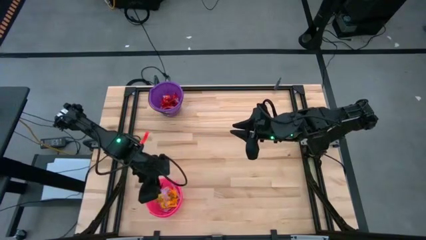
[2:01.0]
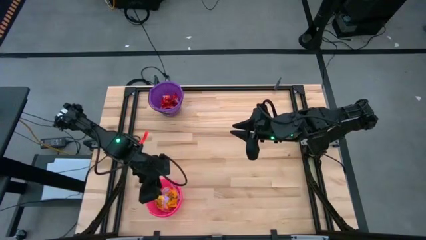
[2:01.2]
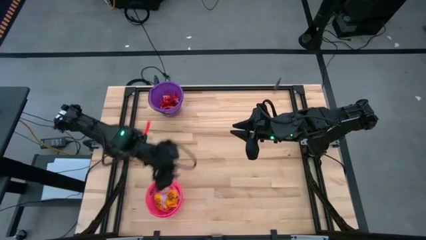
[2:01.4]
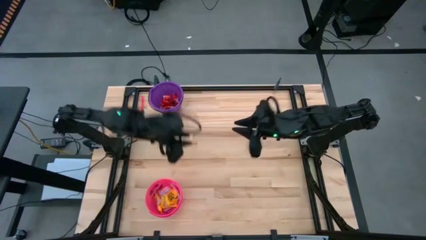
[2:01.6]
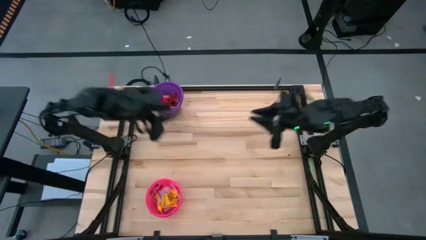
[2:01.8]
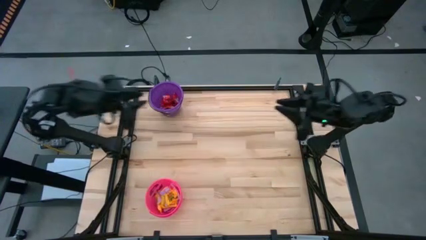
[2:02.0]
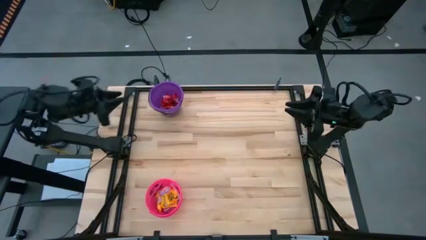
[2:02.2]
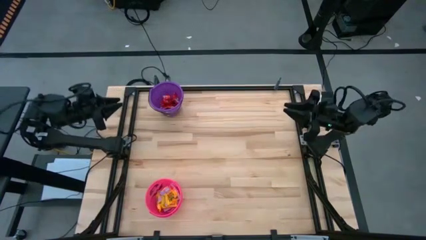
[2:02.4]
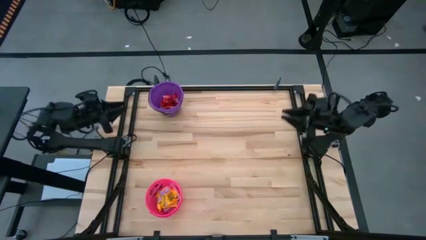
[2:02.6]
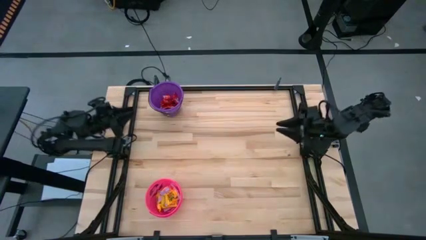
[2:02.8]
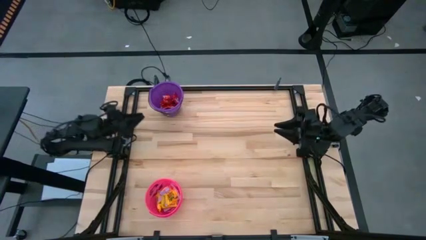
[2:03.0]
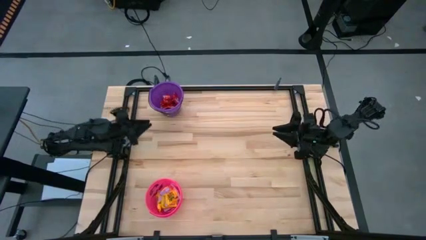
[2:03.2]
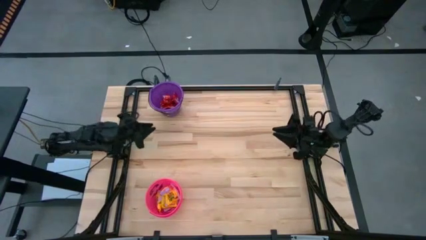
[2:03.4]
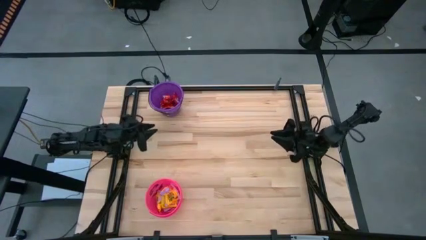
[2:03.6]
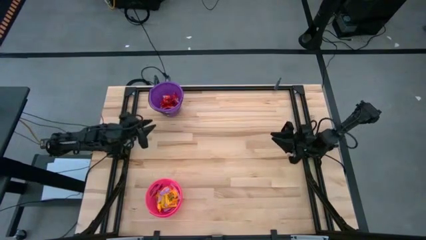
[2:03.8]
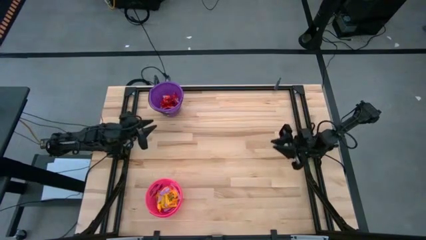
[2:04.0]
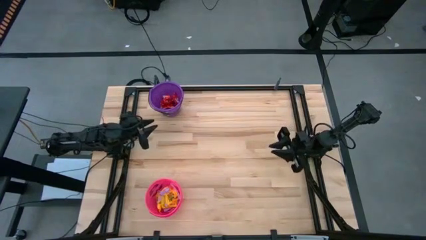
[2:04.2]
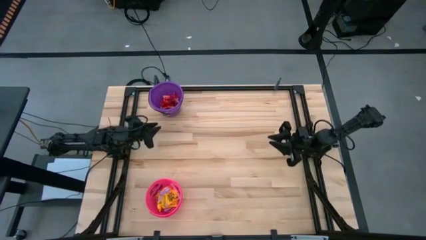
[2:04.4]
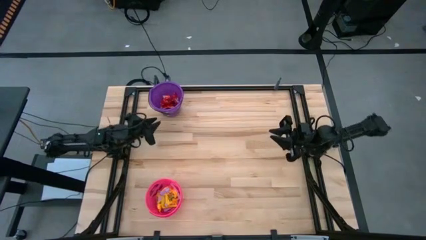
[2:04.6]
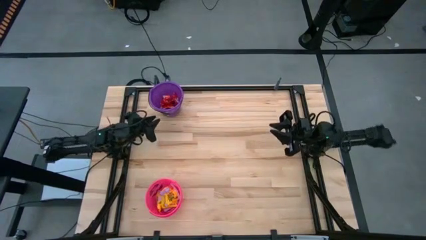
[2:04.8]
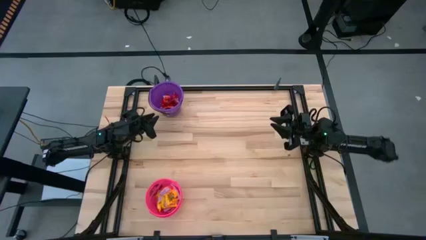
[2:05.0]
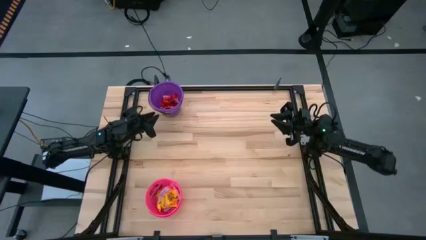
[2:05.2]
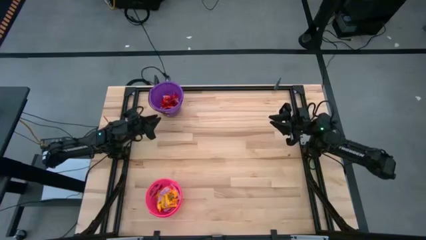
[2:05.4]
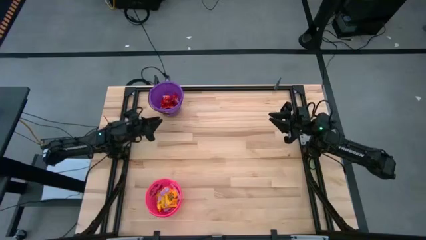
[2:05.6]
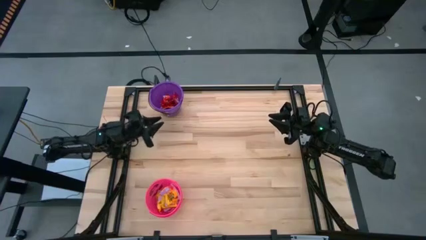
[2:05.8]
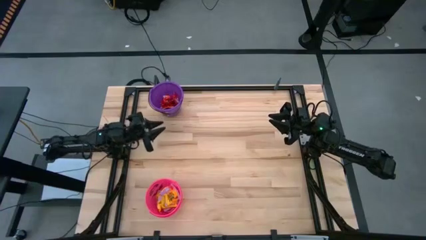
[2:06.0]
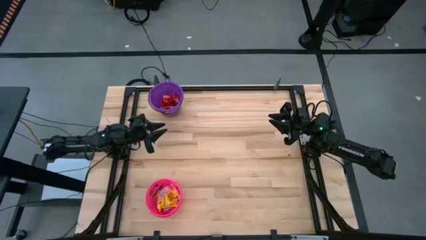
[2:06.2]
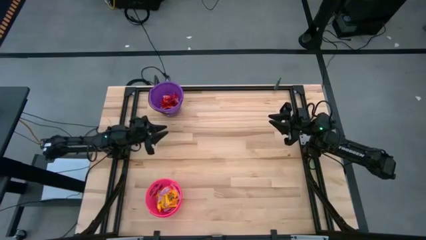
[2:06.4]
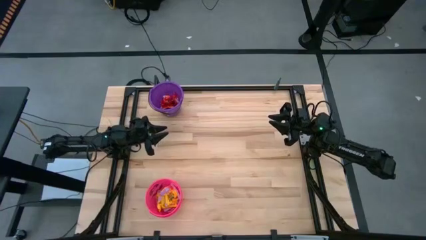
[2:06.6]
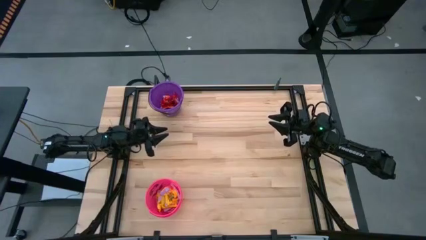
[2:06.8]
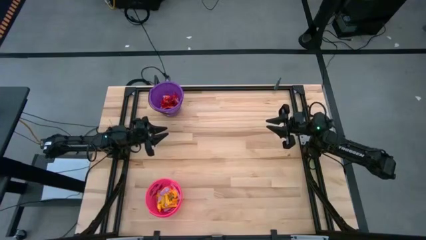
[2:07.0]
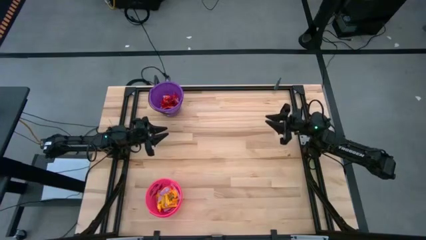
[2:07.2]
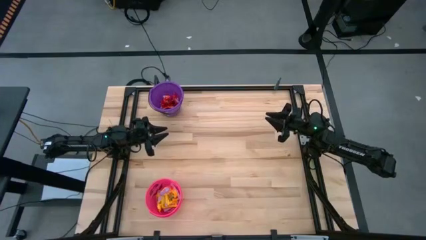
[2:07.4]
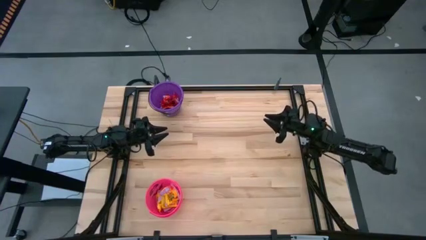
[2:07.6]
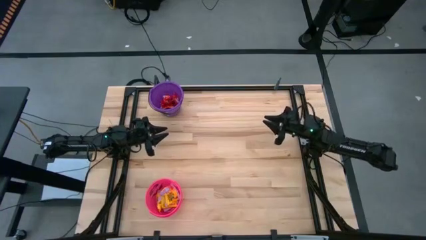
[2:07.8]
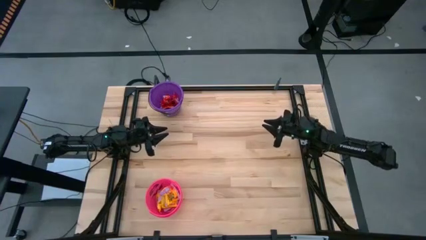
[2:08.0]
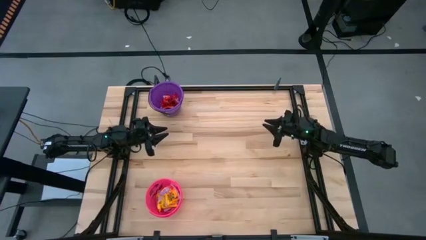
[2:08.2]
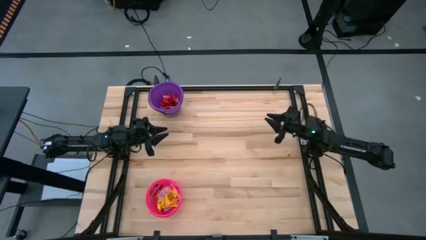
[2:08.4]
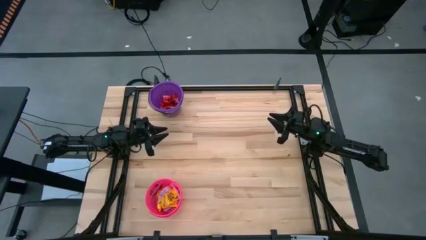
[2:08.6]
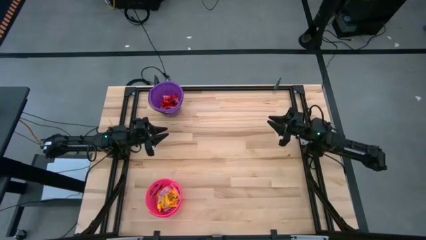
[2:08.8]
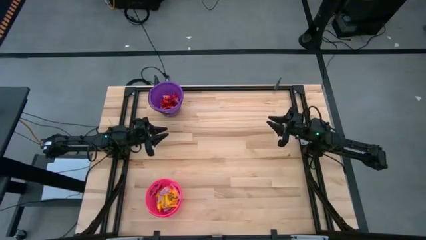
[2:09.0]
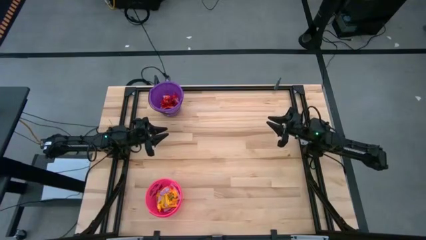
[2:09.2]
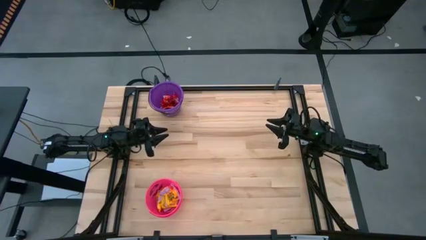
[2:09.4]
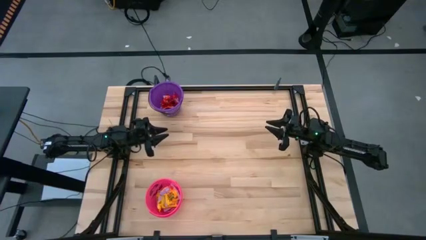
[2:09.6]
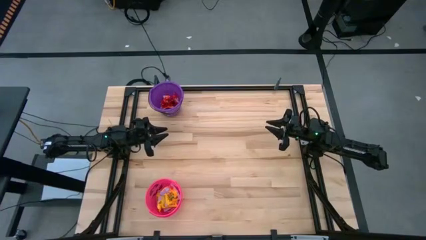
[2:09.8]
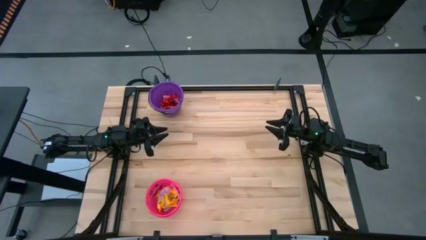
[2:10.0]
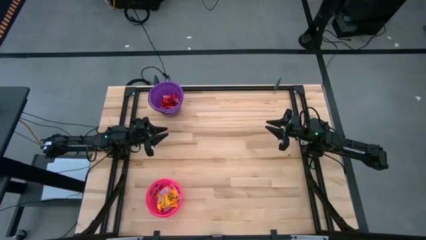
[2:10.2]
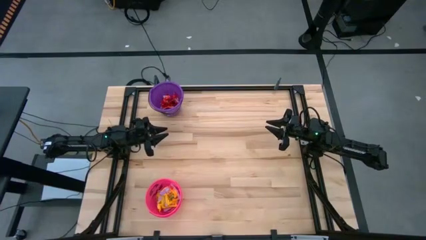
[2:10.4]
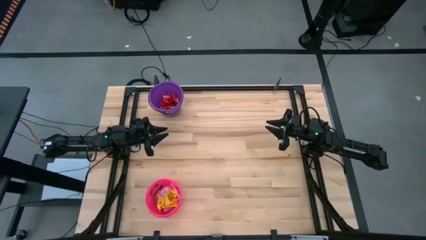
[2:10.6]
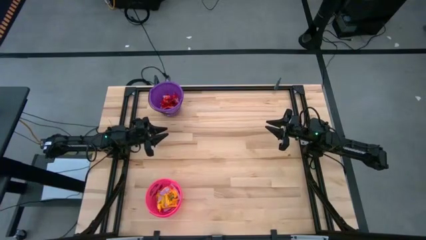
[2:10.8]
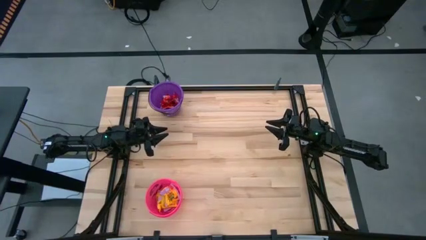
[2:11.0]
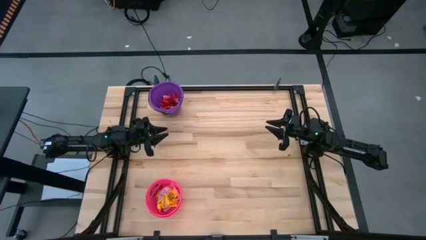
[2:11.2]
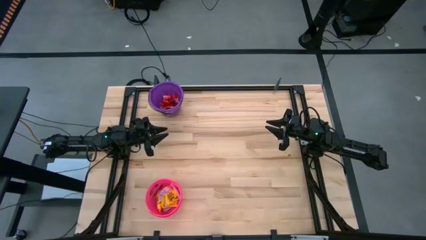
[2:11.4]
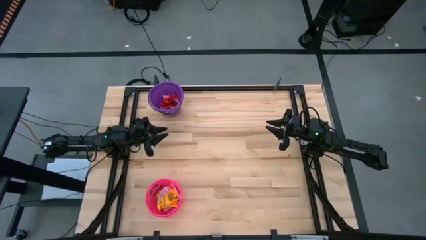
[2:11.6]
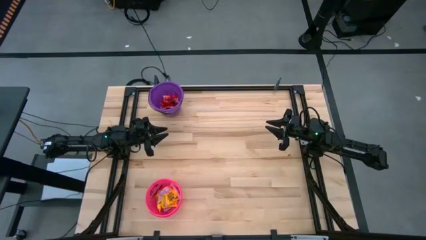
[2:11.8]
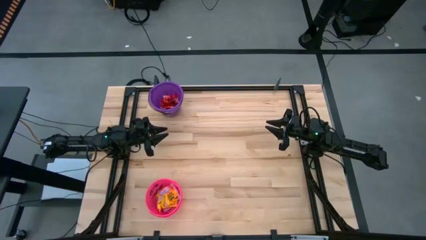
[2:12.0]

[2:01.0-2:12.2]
Task: Sort candy by brand, put in halloween buckets
Return to Home Position
